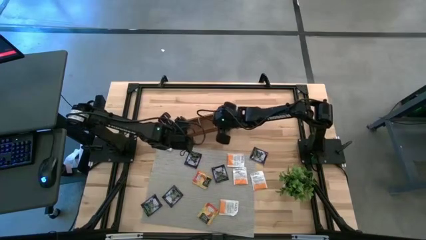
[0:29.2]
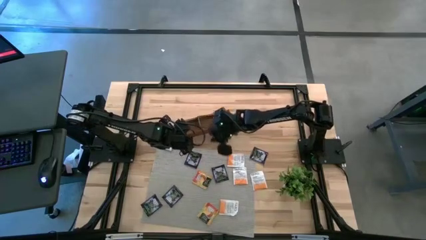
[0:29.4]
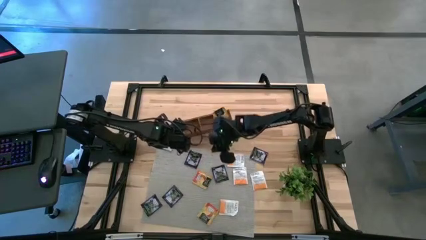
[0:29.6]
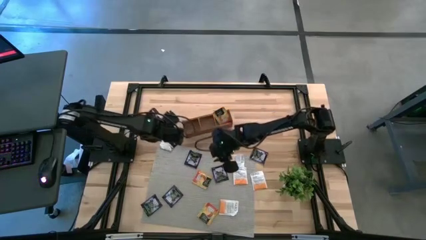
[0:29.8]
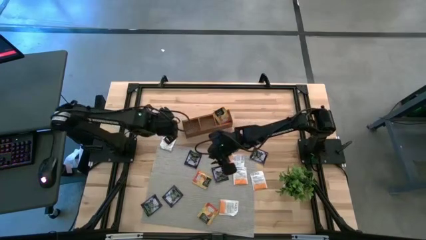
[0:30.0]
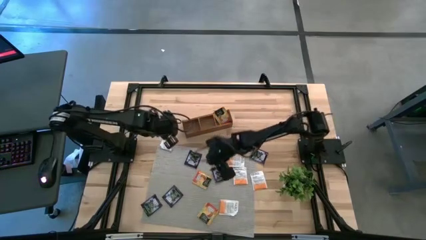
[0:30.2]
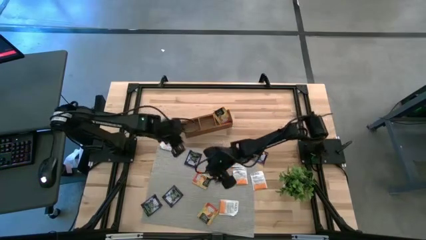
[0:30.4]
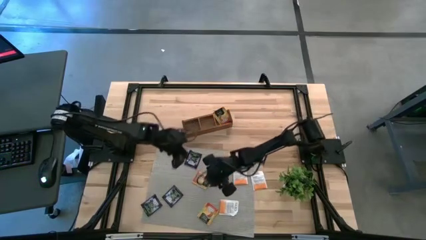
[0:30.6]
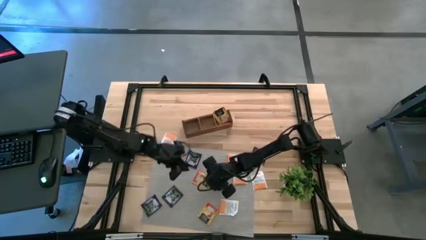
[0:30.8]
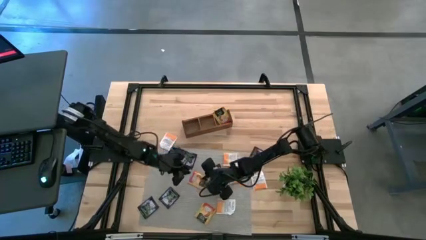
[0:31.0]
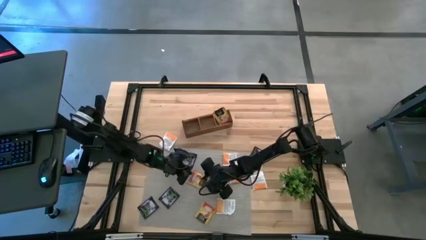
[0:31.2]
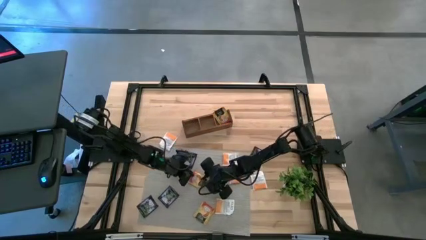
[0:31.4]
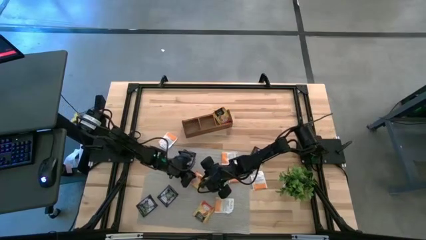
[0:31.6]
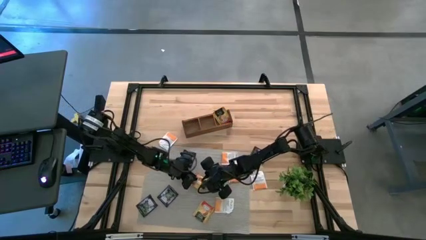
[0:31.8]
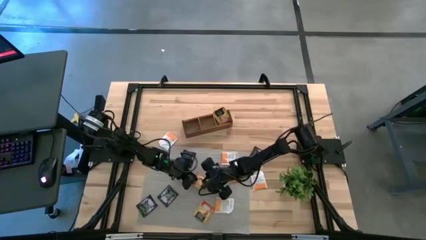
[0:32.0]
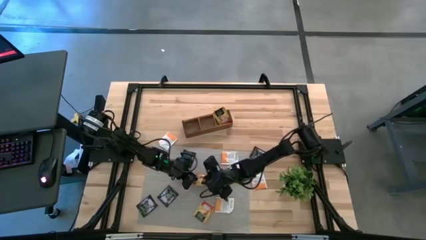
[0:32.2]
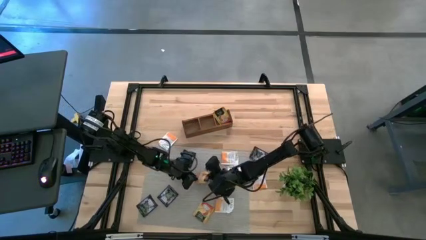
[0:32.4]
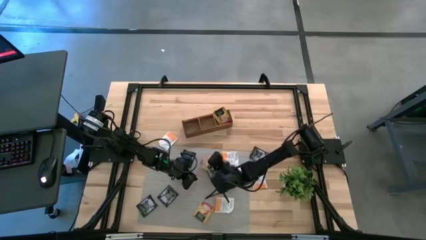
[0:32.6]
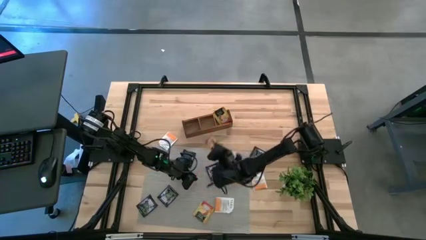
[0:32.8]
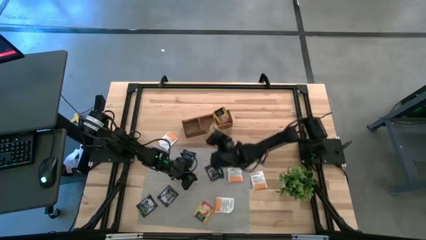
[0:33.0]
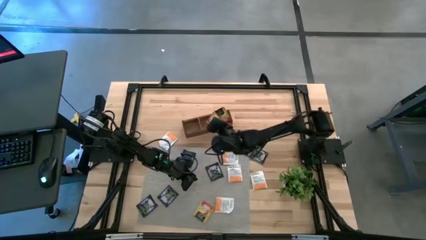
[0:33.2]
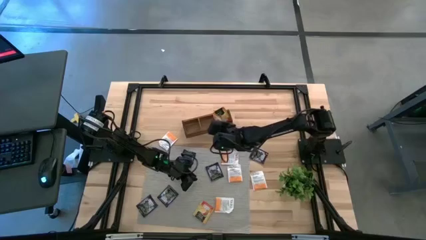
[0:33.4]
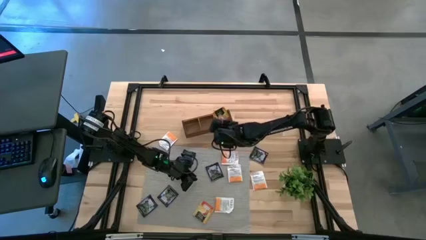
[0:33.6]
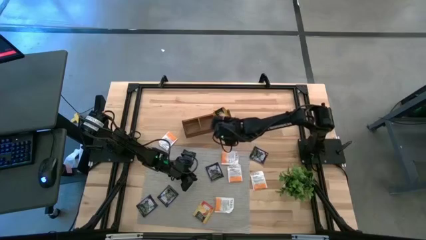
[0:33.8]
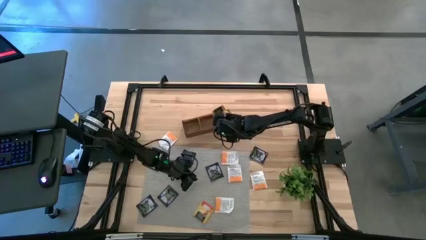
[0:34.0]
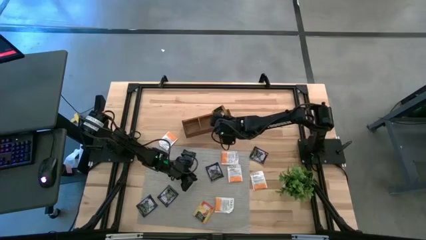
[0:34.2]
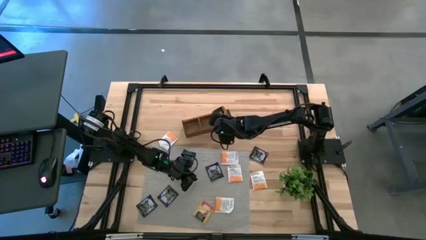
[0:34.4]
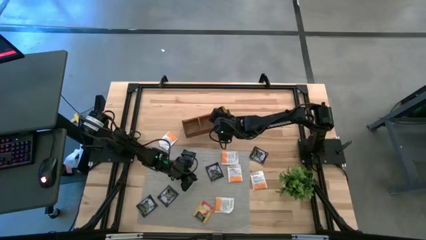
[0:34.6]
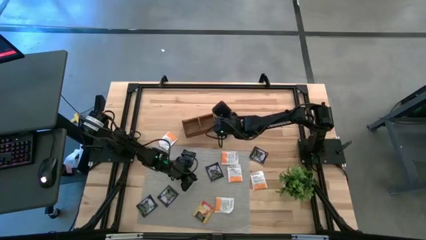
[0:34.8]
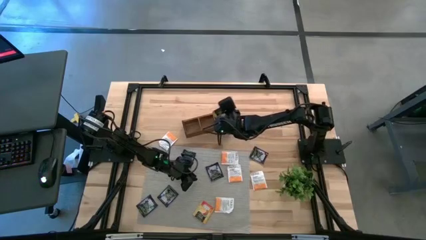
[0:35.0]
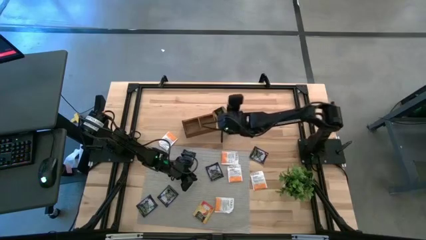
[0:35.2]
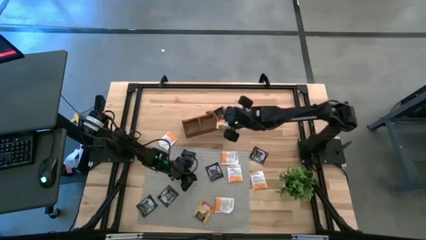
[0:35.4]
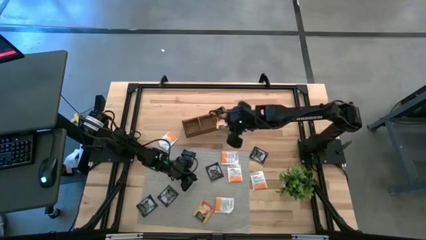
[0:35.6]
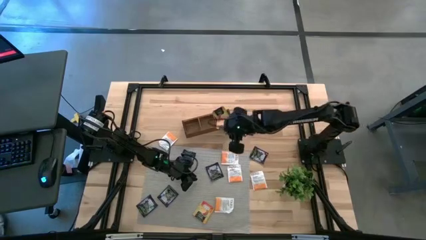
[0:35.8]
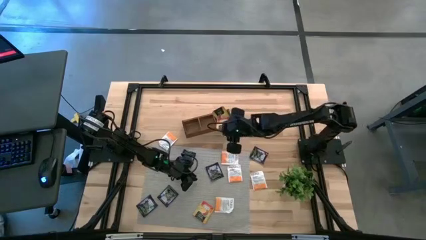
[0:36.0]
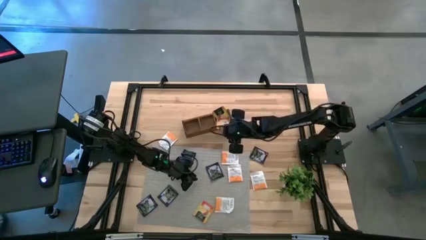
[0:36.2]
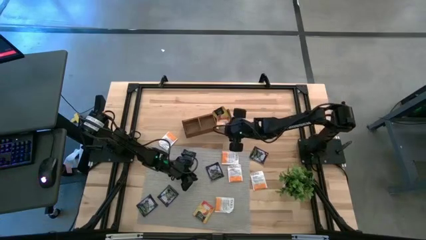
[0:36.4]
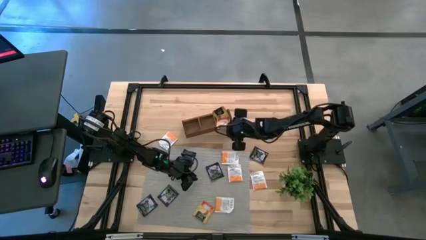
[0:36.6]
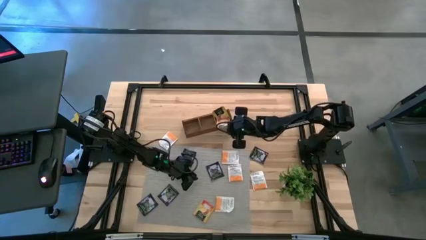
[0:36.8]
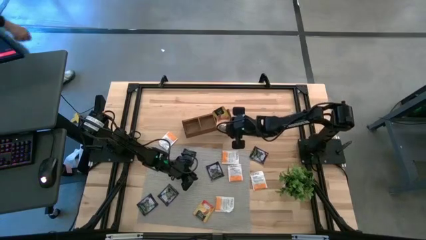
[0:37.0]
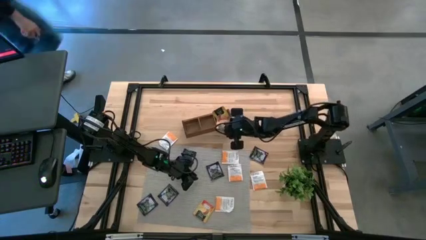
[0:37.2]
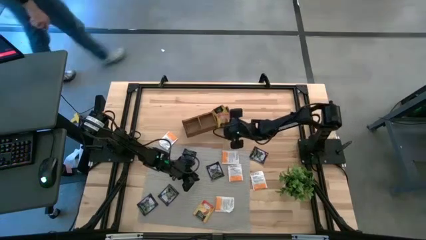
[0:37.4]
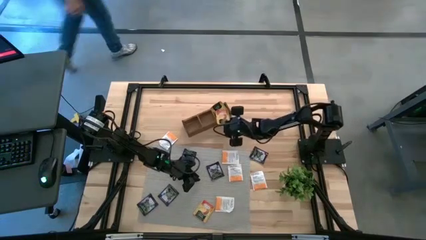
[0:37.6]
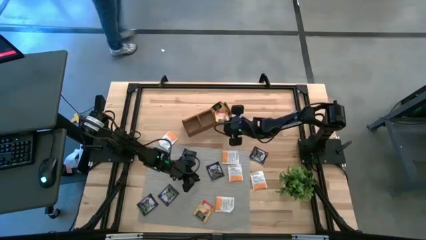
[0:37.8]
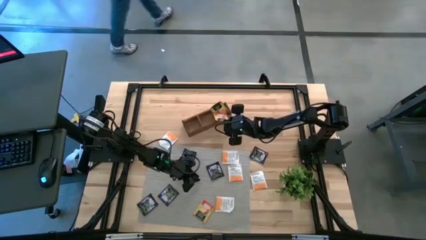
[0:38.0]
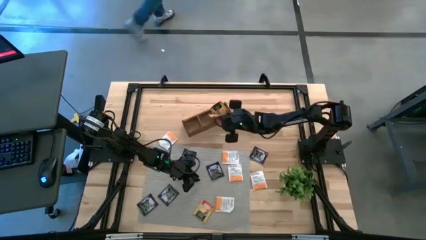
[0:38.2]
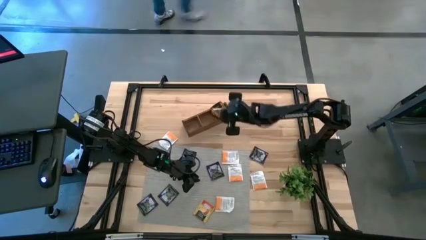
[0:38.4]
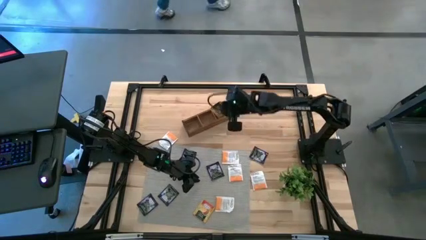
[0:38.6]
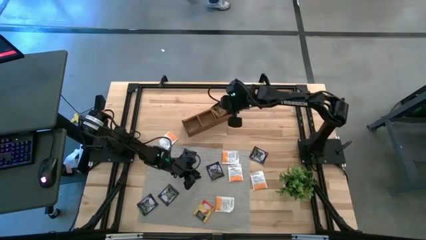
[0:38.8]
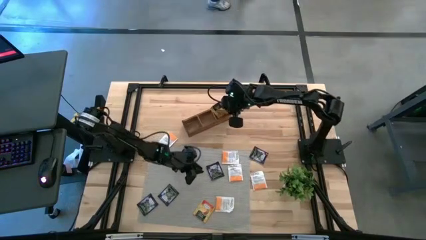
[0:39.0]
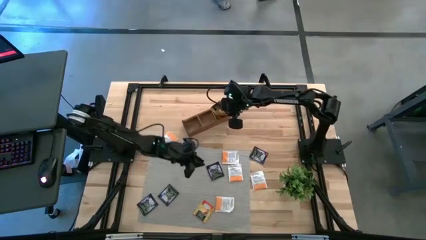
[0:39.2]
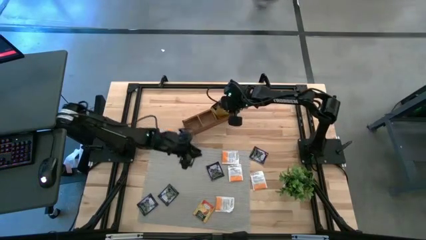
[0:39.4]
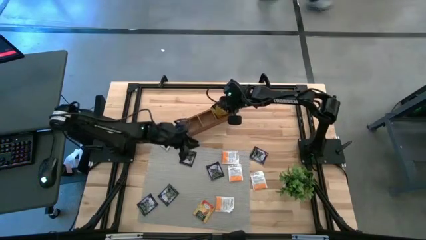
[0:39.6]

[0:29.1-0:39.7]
Task: Pick & Place Tea
Put the yellow tea bag into the right section of the wooden organizer

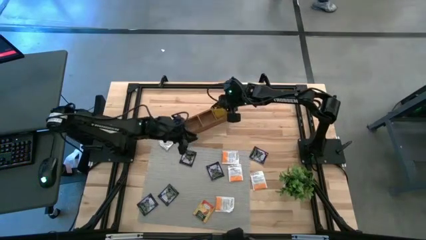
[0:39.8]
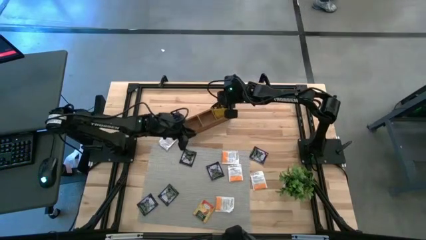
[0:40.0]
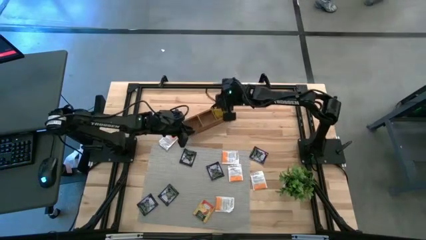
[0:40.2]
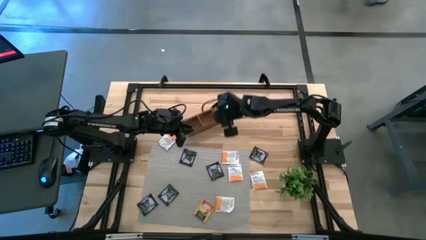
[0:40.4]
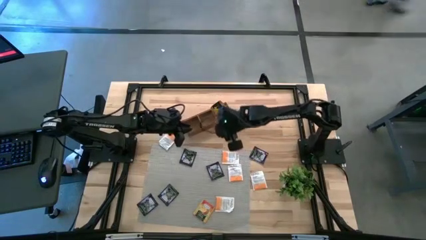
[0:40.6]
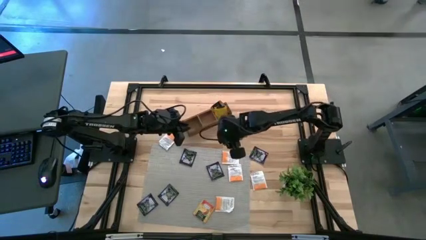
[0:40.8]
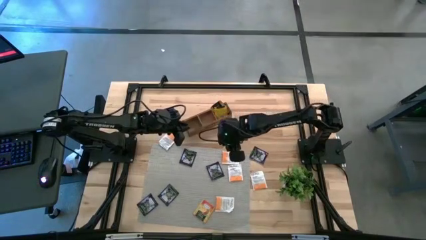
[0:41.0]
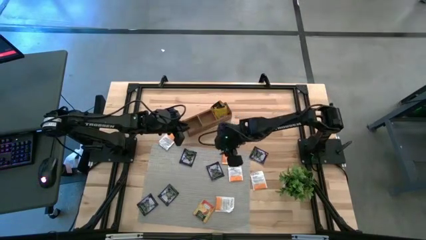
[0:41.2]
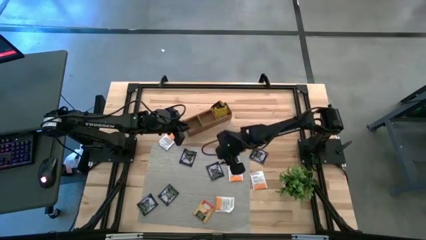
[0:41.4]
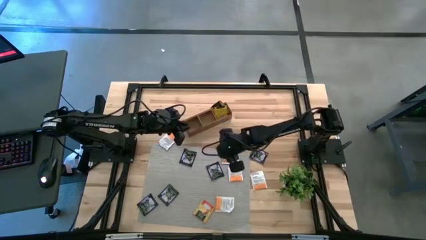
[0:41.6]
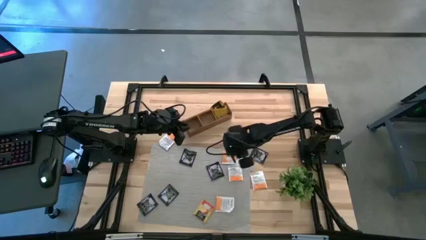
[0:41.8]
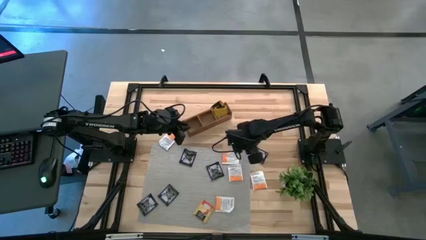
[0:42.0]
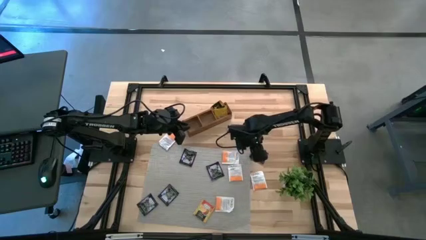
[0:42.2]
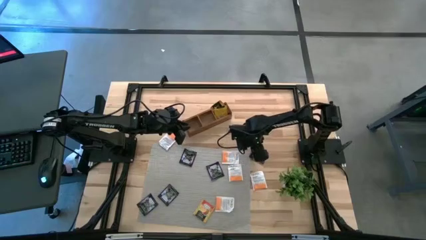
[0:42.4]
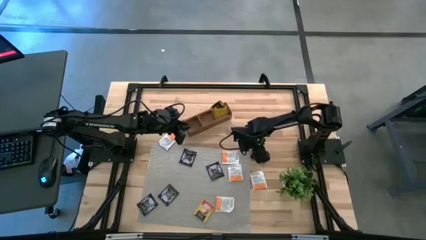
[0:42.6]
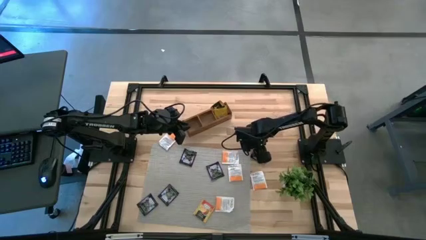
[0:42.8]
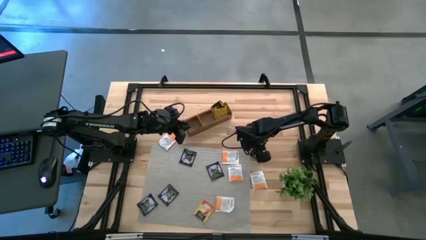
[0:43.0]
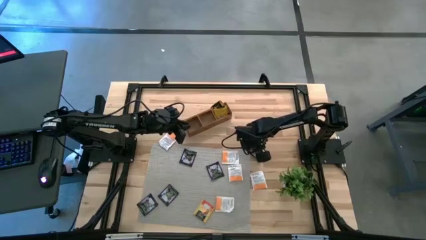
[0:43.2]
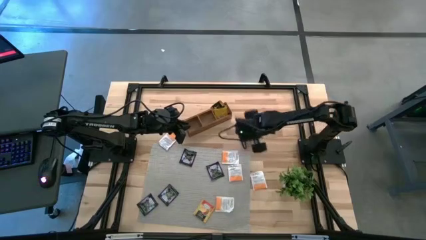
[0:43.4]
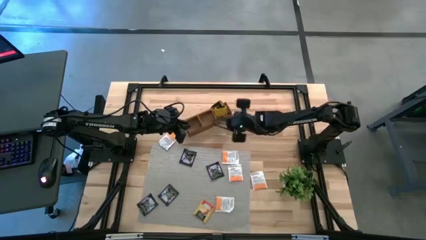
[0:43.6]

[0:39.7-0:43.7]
Put the violet tea bag into the middle section of the wooden organizer
